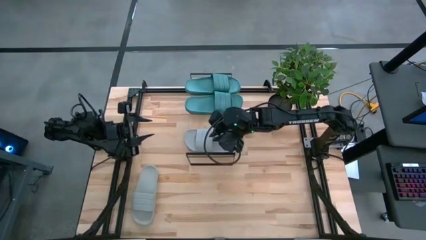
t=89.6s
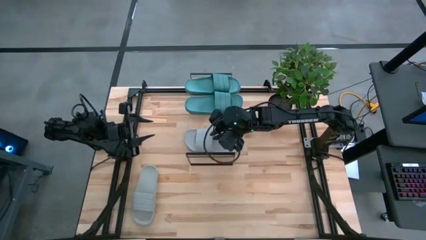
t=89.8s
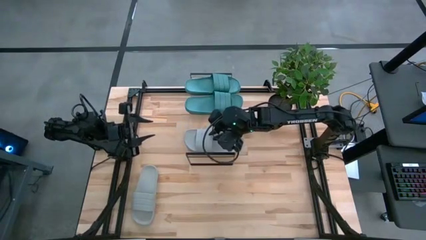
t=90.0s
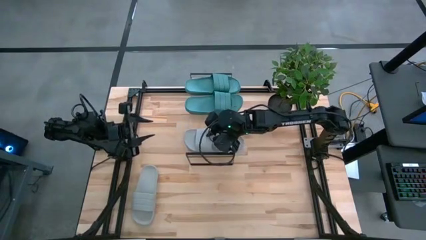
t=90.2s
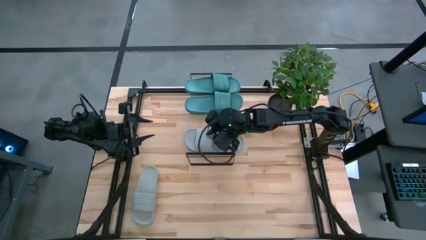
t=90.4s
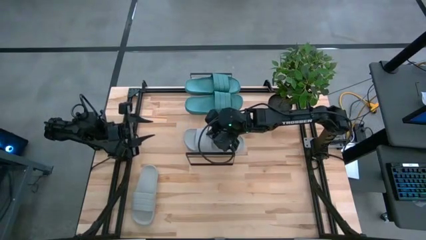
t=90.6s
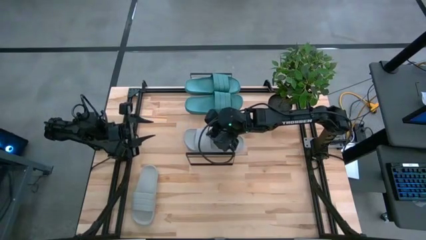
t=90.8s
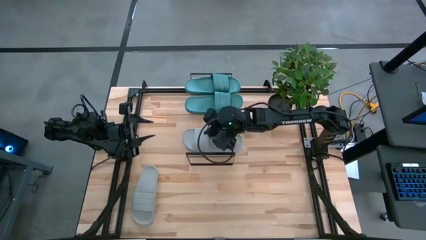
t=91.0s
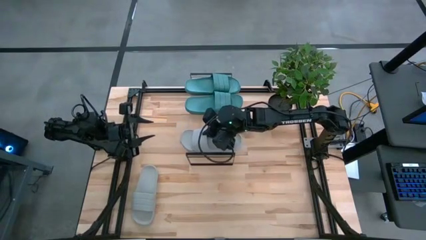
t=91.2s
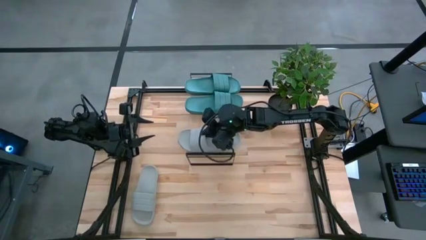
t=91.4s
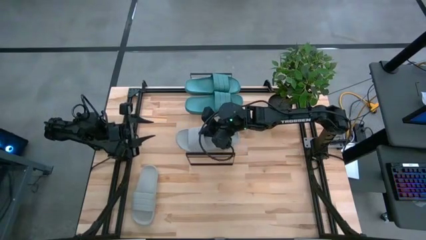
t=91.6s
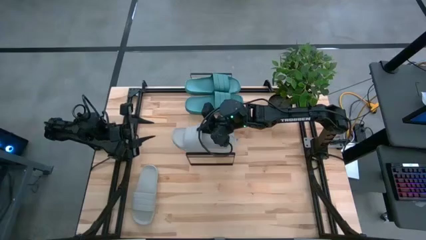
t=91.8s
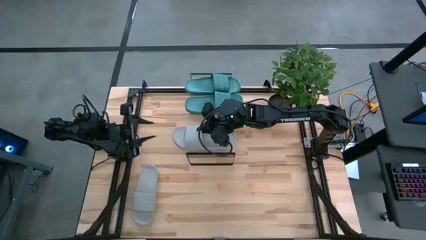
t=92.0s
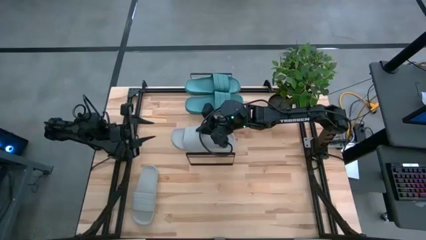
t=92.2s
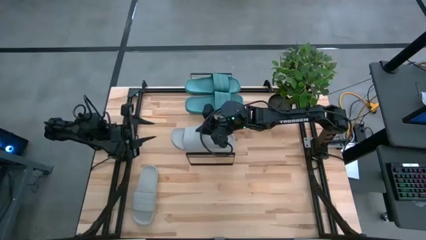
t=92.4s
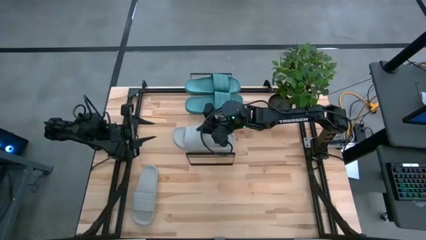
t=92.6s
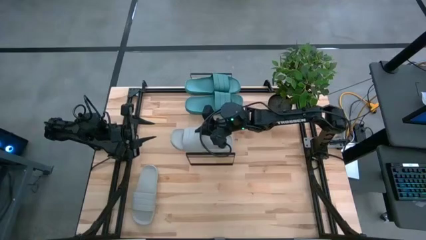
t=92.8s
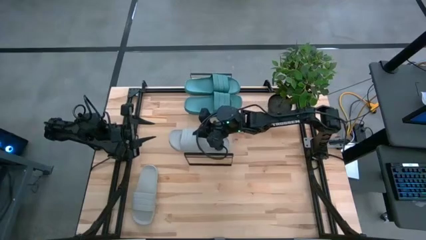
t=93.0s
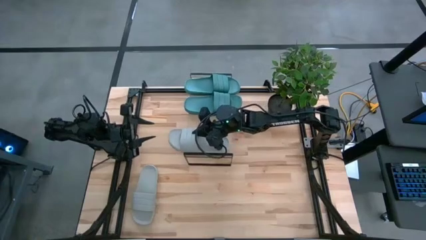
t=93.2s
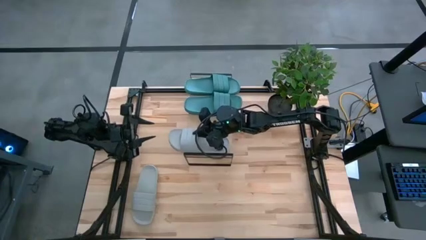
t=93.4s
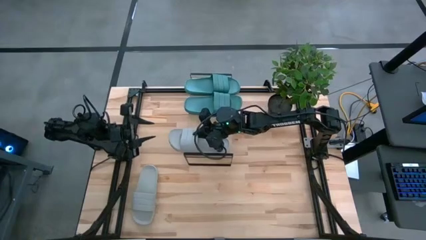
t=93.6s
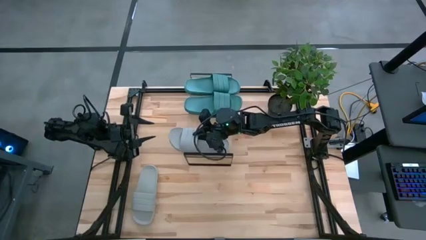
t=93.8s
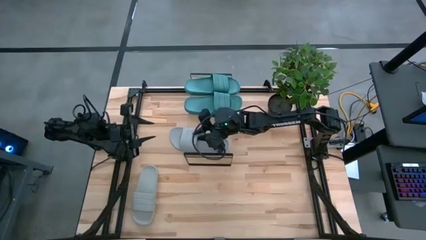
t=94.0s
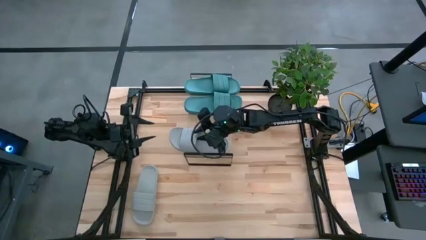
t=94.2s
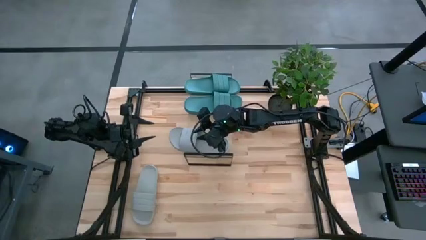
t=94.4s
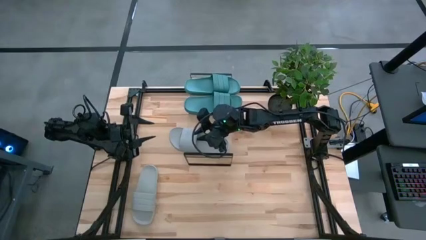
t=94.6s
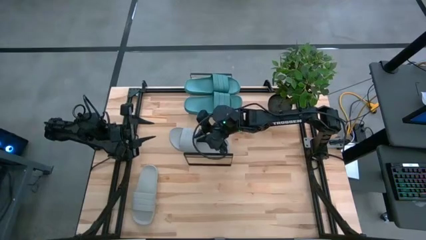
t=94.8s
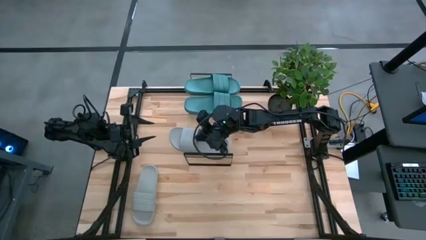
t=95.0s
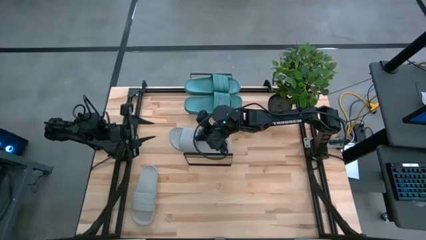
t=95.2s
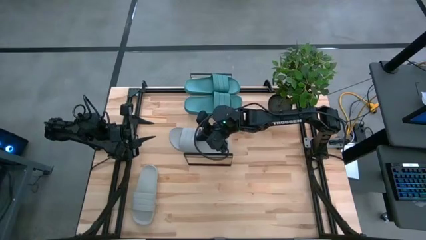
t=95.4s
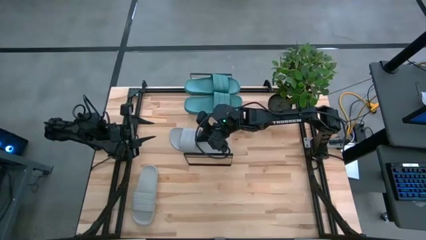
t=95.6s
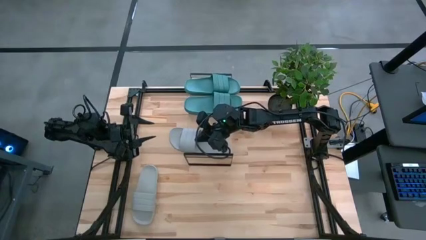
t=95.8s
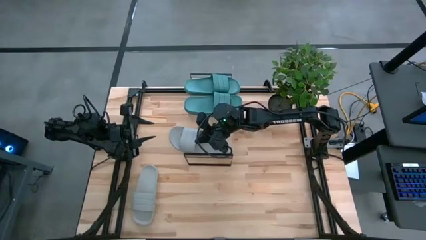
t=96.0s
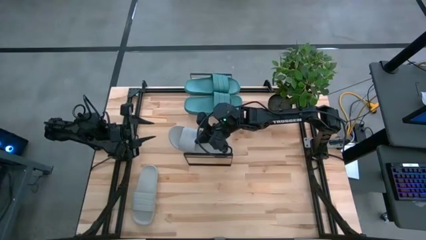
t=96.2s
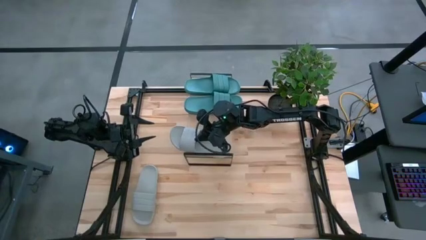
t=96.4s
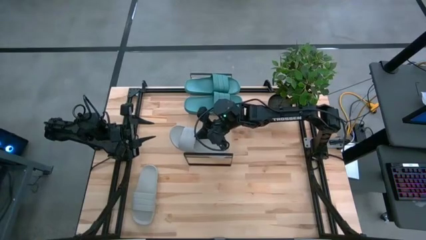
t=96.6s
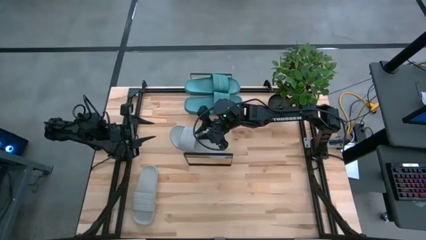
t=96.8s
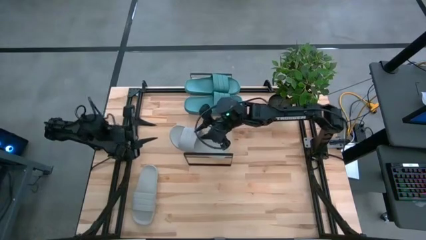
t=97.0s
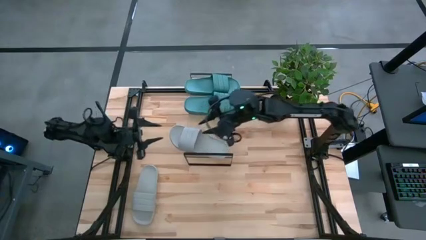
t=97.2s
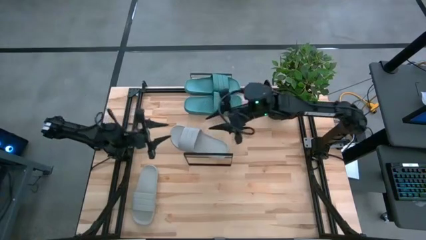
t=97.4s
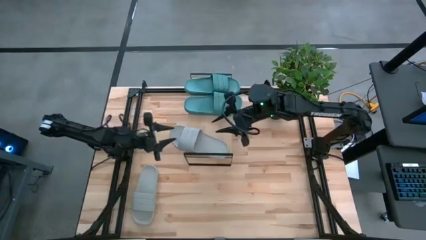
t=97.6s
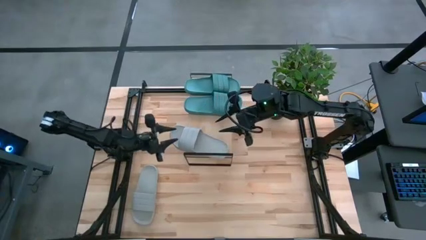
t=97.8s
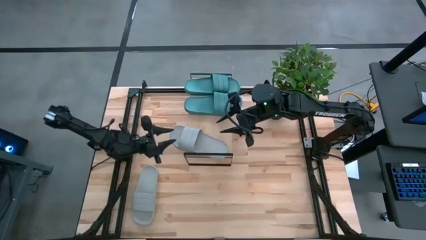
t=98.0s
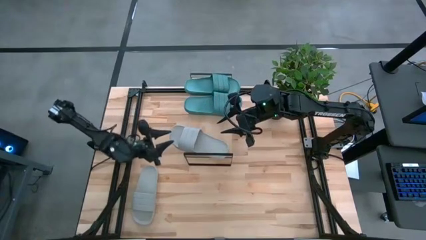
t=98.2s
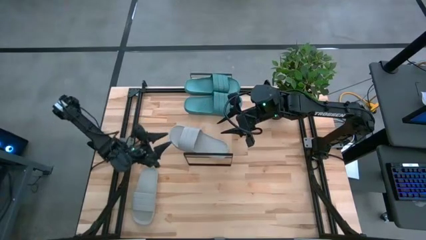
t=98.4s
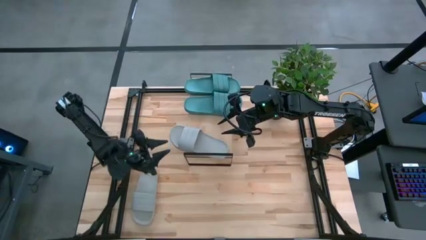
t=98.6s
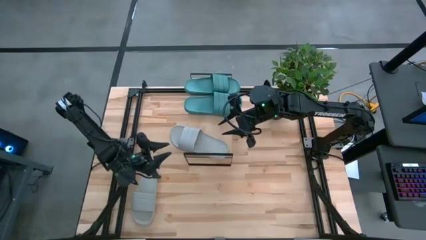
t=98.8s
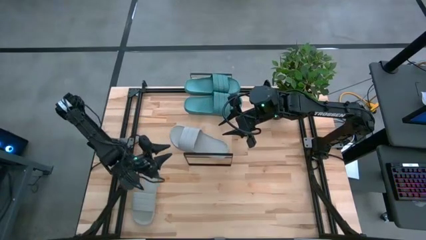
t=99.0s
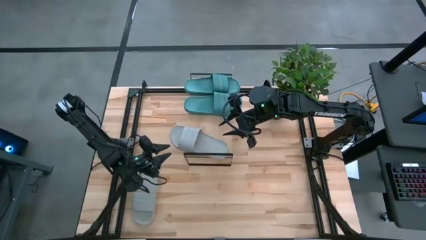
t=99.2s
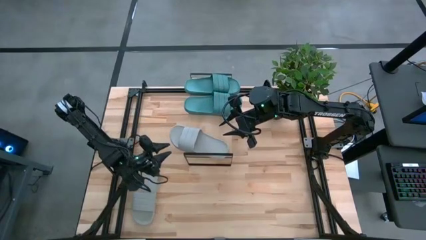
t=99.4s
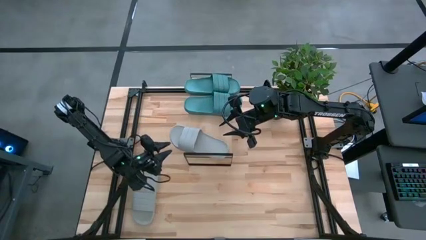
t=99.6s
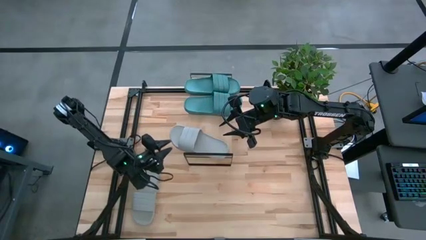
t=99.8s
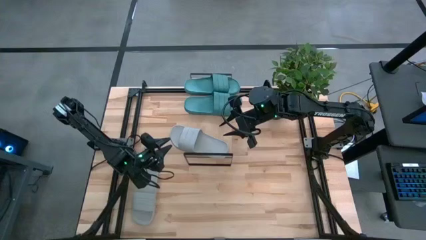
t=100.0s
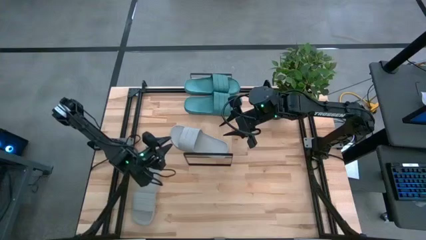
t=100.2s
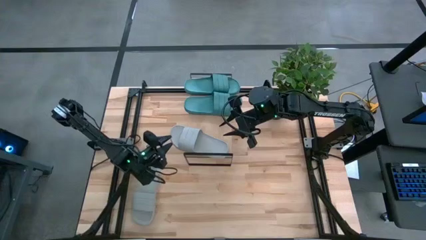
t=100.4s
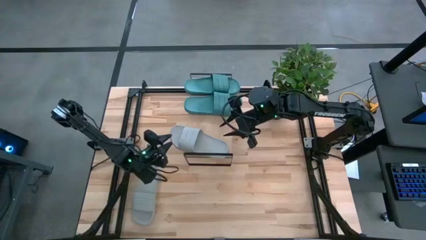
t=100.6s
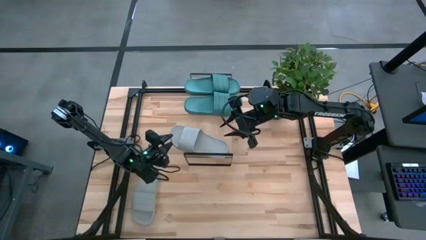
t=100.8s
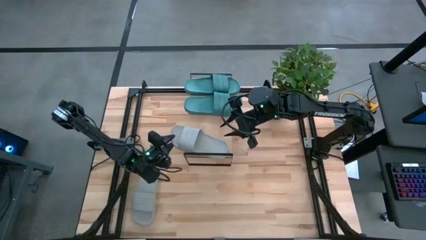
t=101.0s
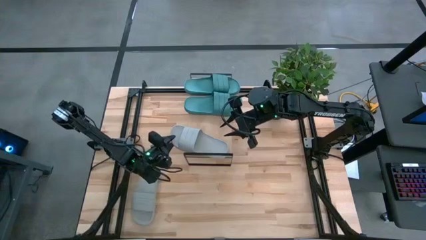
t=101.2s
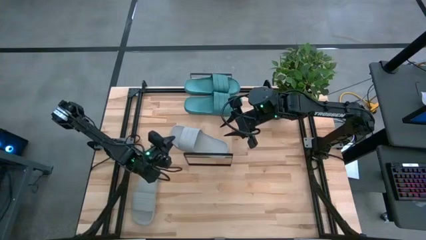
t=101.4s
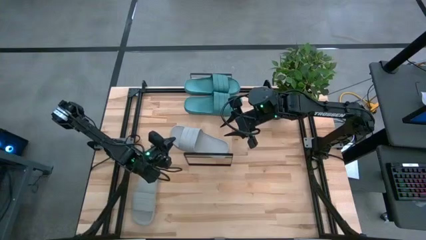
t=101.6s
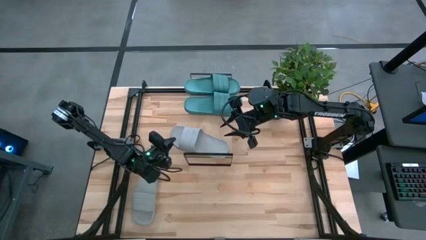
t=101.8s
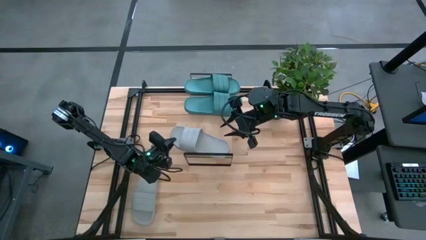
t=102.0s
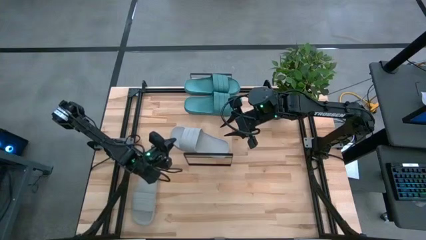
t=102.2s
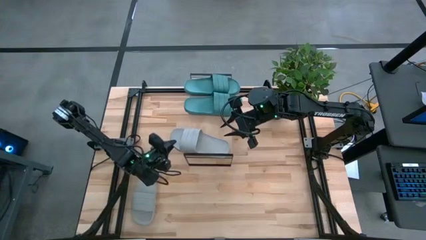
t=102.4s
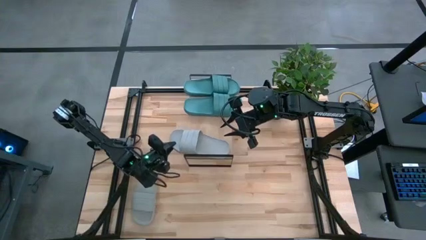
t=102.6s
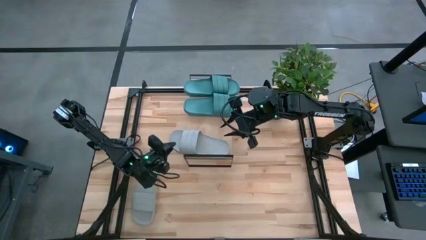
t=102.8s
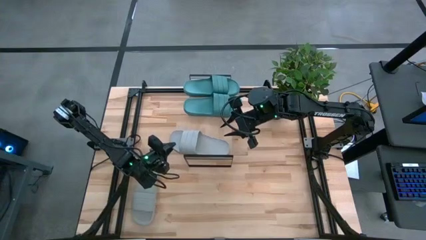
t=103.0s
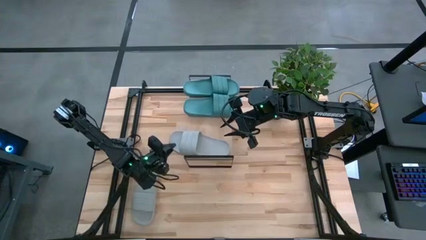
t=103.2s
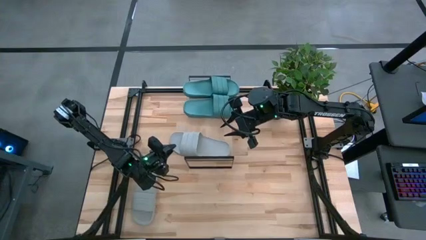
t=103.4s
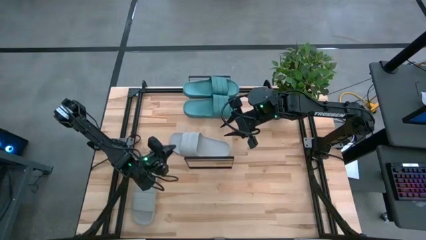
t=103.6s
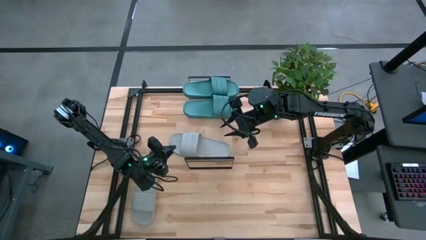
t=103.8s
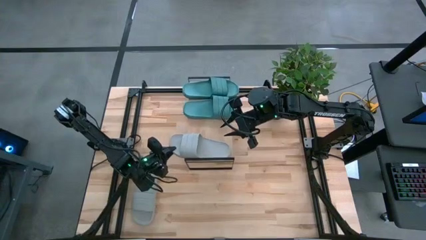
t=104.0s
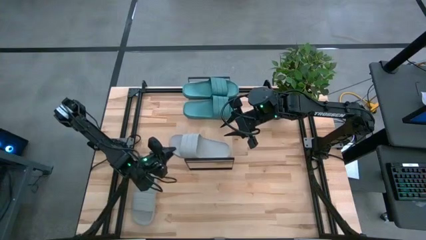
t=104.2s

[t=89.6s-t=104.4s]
Task: Pick and place slides into the shelf
Put the right gray slide on the shelf
